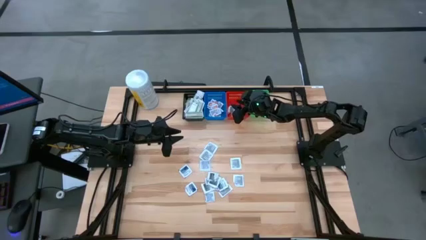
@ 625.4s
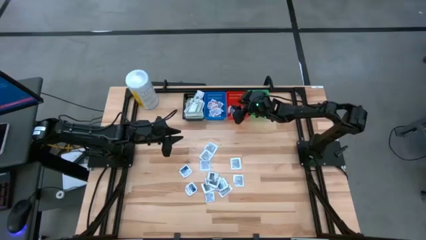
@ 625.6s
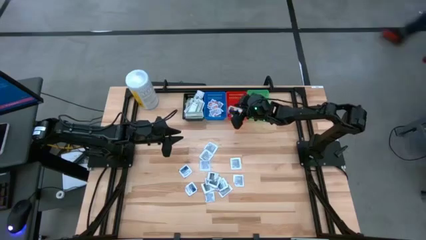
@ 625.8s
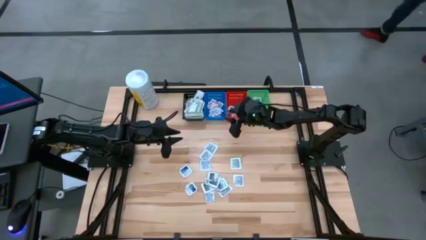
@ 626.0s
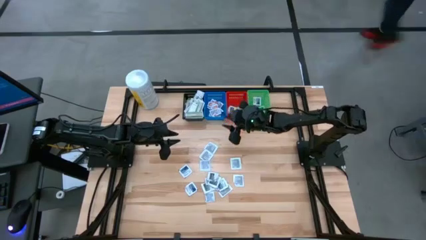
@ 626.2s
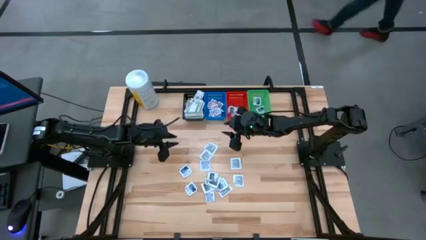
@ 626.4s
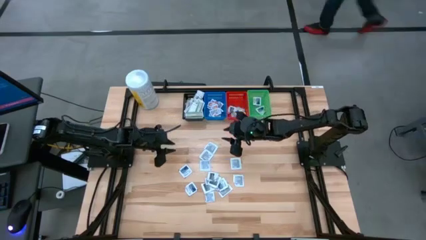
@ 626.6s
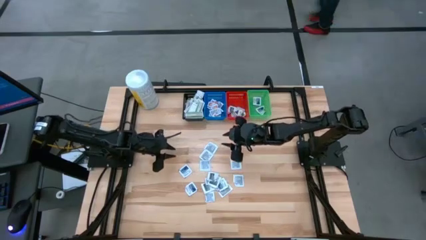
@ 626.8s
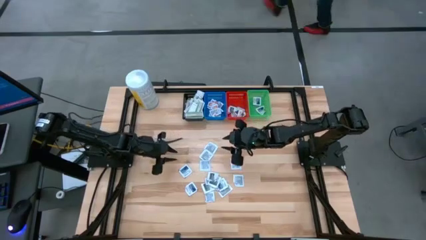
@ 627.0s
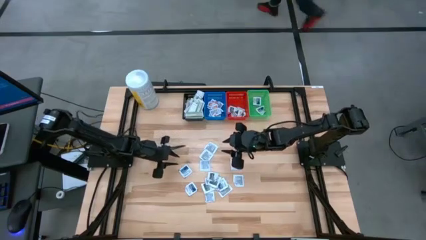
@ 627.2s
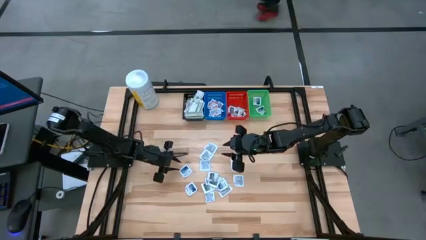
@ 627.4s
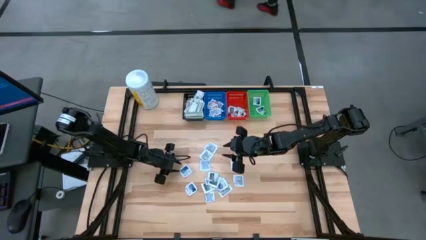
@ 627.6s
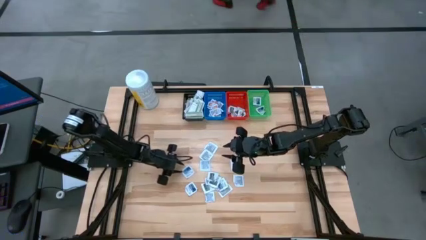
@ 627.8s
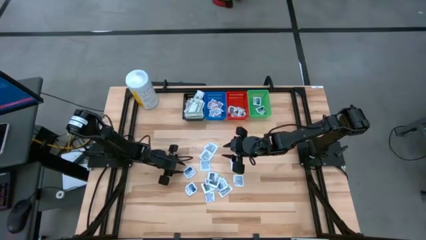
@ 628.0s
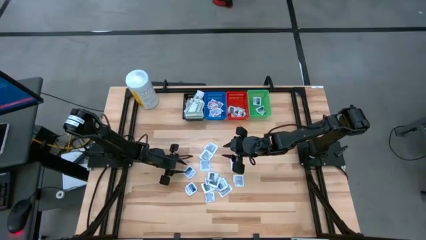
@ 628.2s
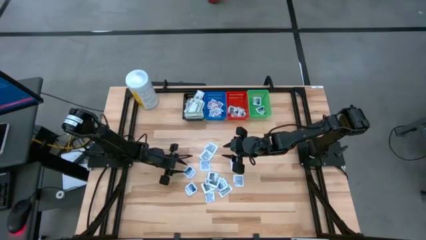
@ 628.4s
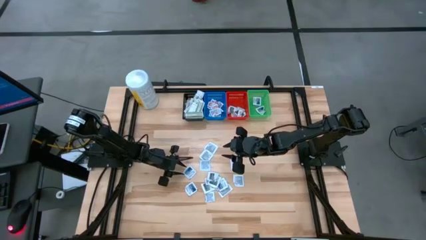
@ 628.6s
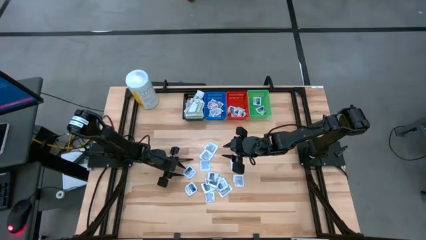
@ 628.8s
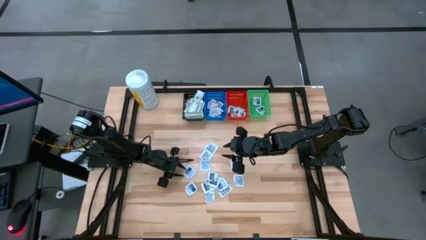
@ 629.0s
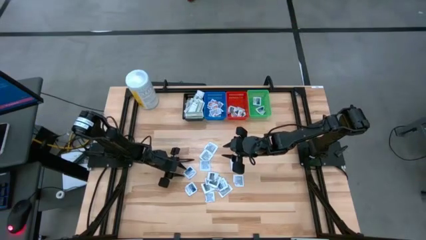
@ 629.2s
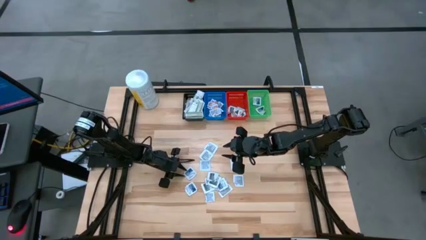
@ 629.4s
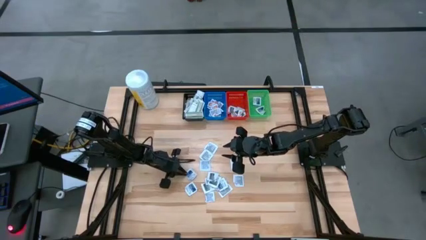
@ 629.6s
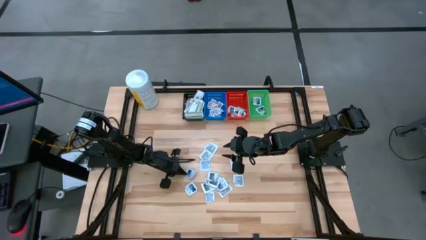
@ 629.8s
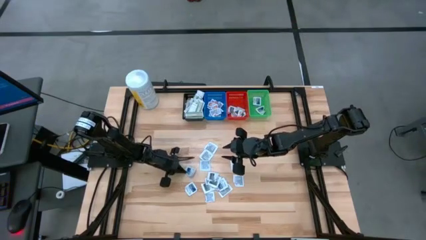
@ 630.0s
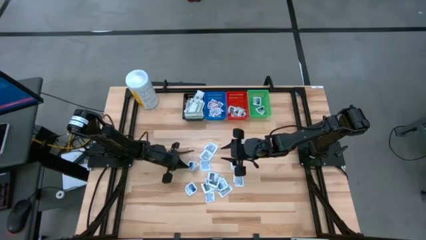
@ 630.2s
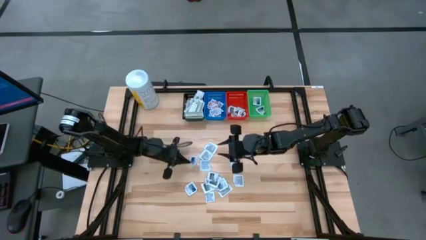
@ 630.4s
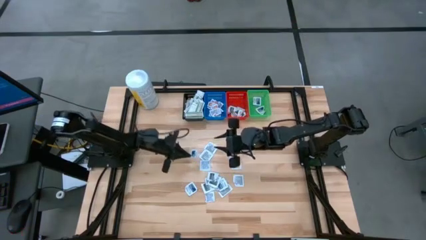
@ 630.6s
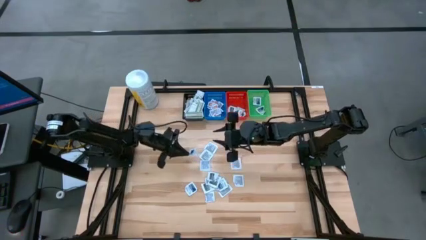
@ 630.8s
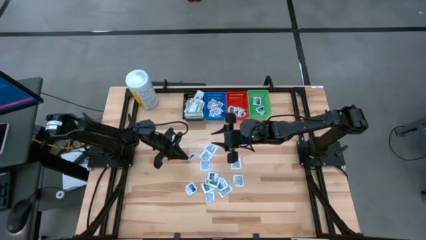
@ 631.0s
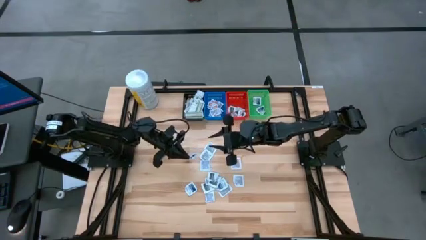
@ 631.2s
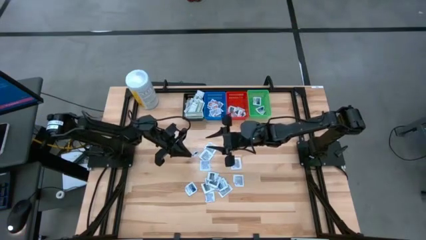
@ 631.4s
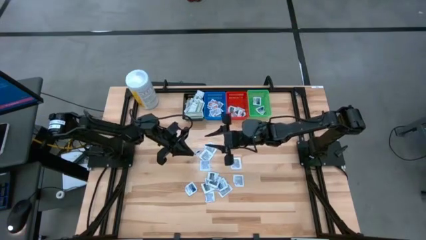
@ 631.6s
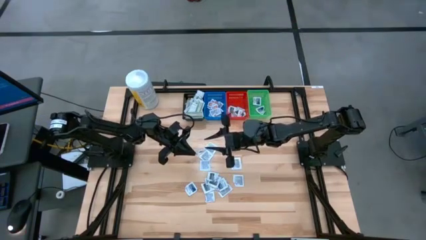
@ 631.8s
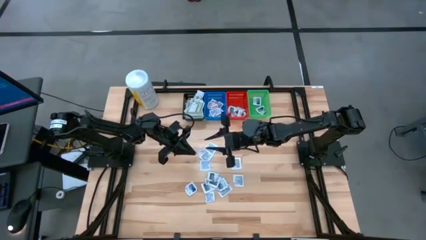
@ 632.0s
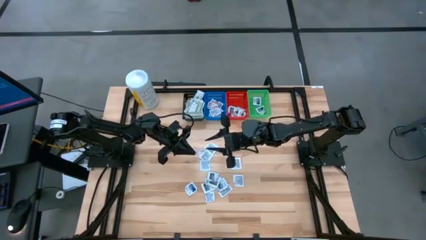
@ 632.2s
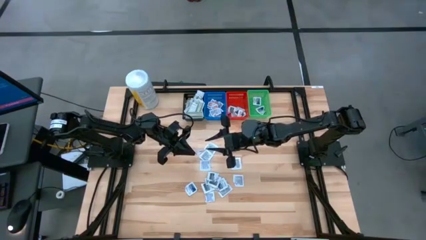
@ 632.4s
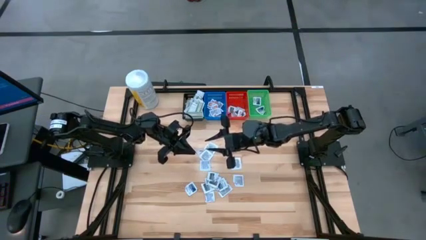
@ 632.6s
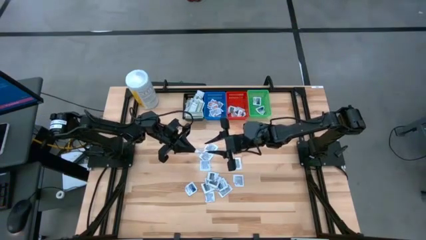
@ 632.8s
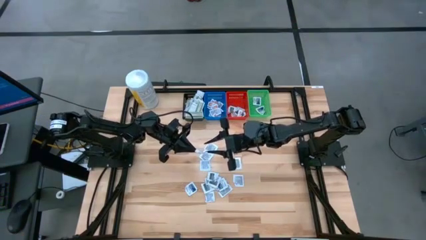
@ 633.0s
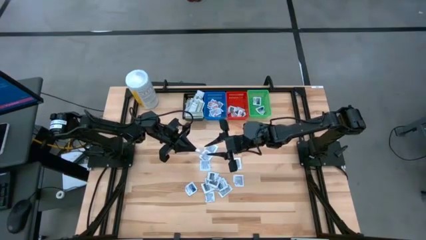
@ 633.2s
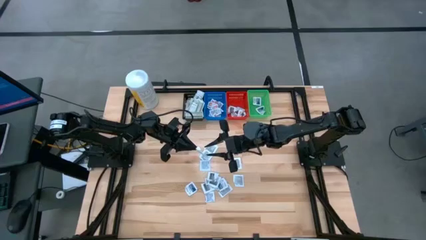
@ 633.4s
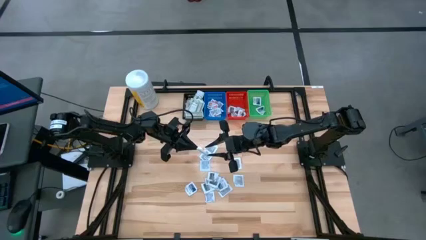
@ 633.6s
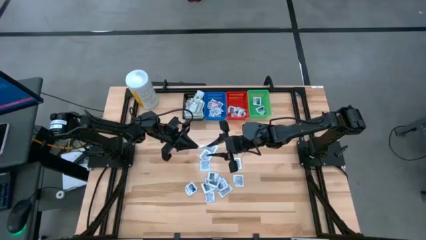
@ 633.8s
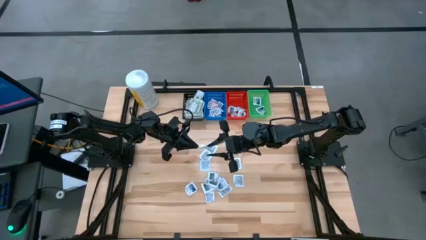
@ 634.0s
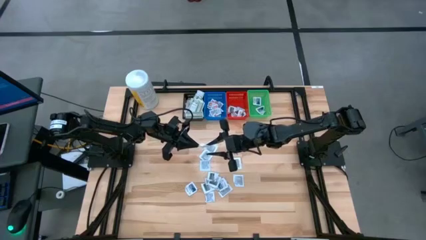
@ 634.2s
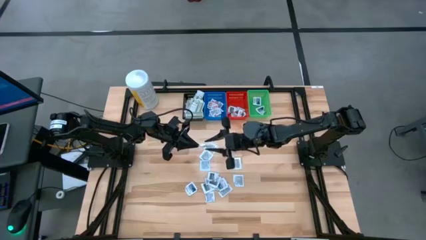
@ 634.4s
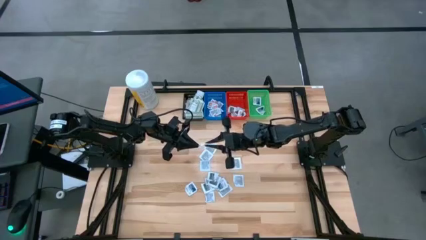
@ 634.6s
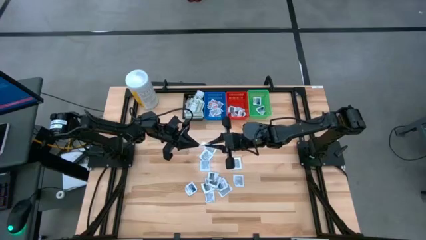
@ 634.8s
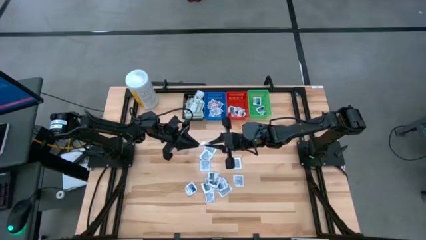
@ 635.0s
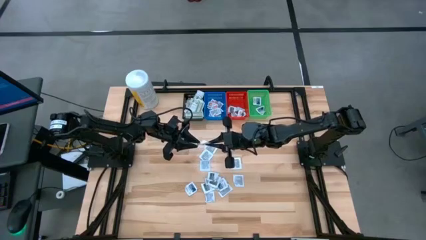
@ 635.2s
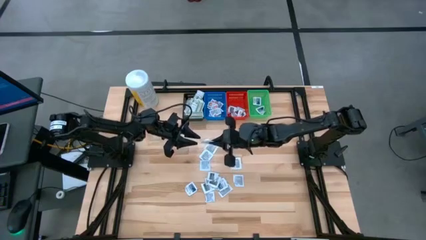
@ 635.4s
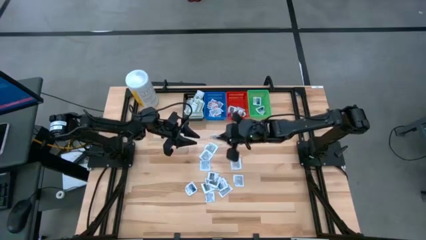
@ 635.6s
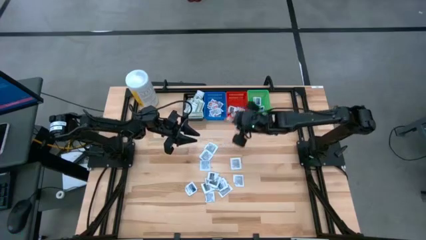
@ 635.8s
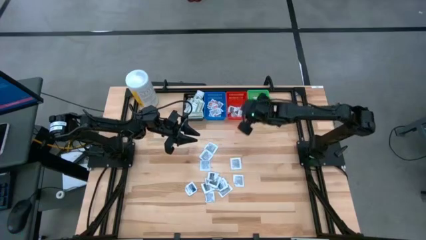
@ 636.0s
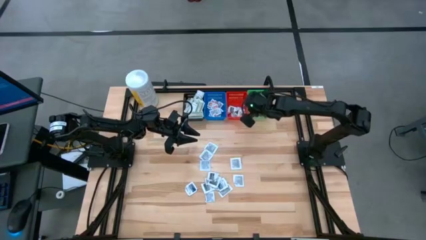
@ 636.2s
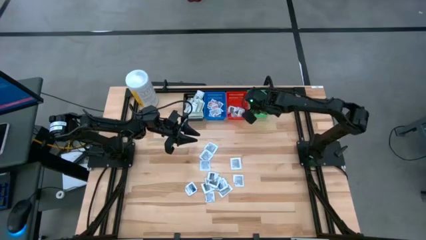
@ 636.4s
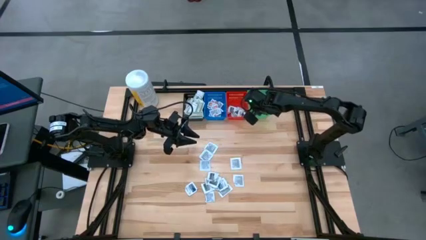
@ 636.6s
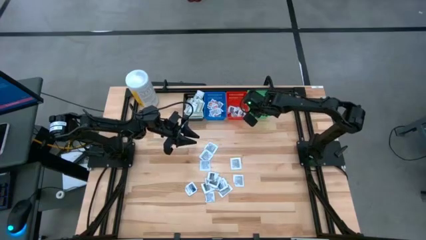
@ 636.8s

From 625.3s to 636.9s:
Task: Pick & Place First Aid Supplies
Put the blue alcohol pad in the green bin
